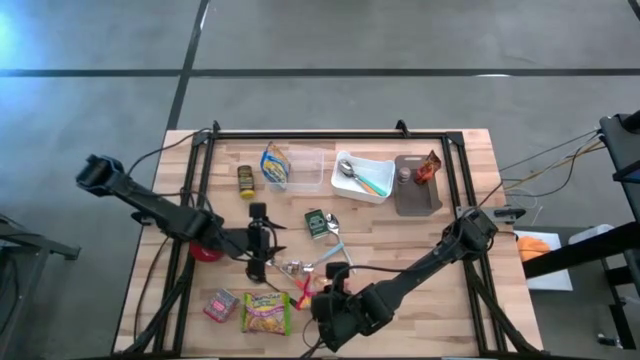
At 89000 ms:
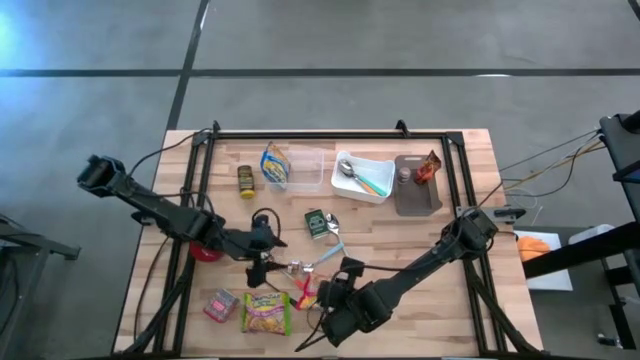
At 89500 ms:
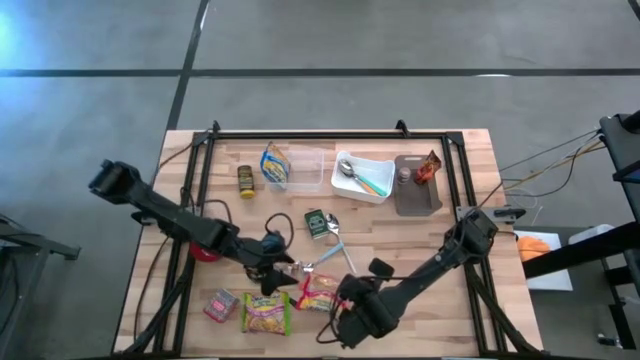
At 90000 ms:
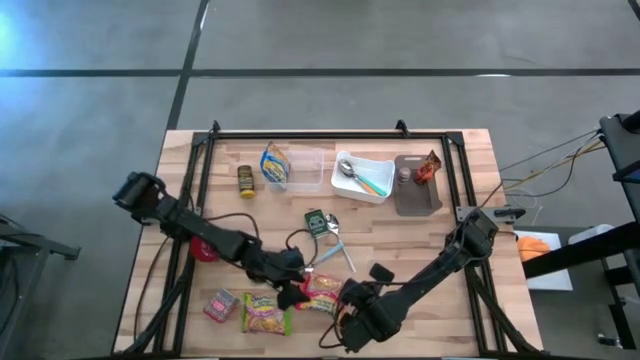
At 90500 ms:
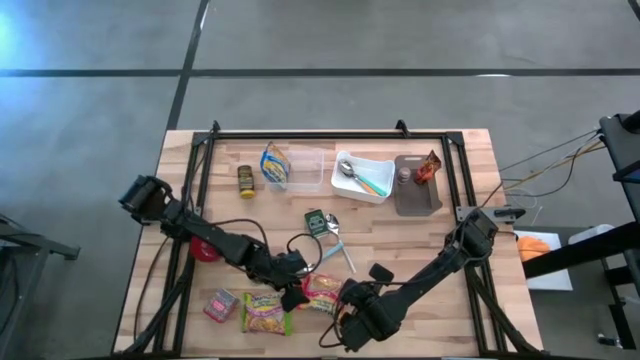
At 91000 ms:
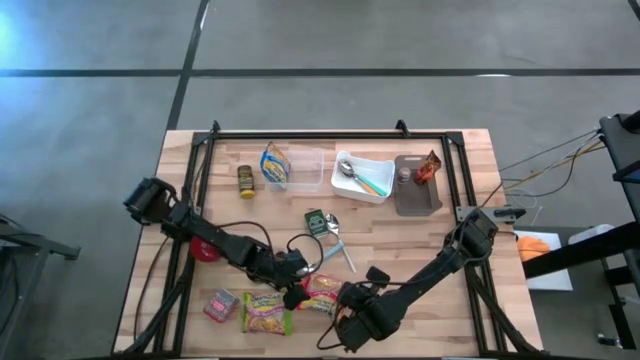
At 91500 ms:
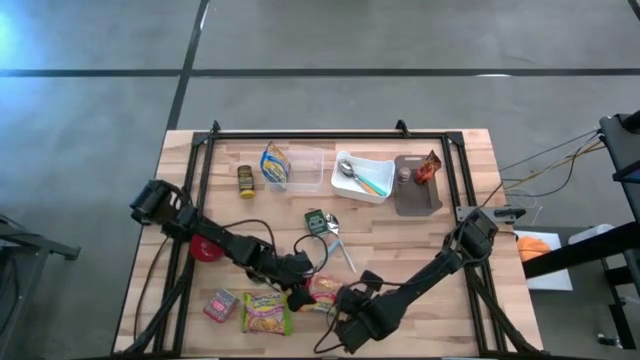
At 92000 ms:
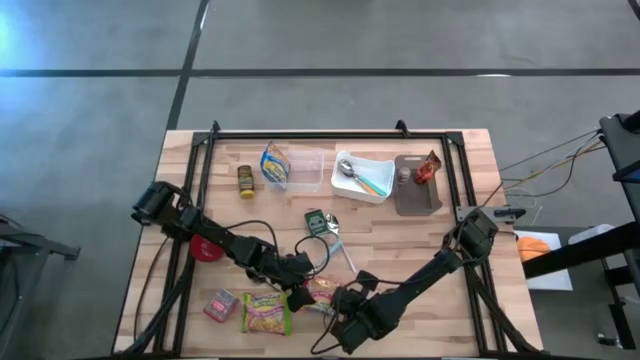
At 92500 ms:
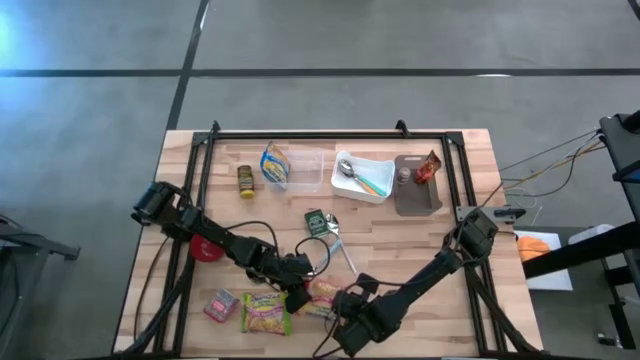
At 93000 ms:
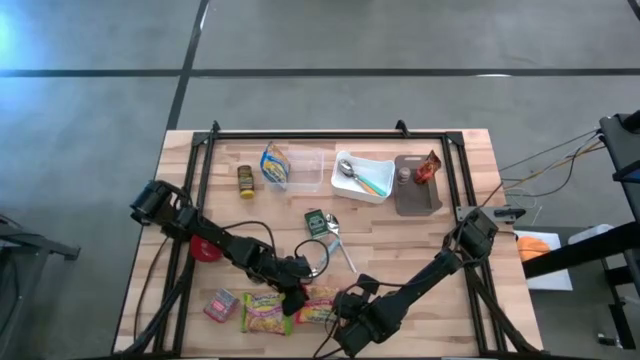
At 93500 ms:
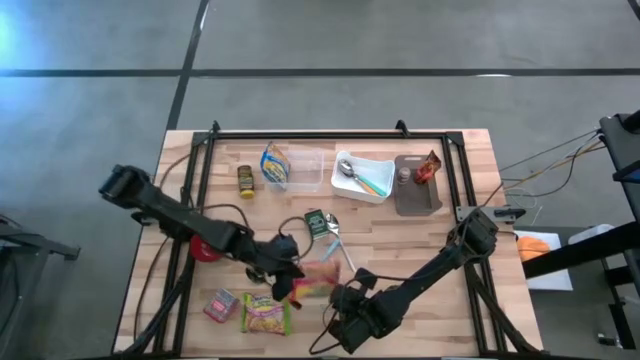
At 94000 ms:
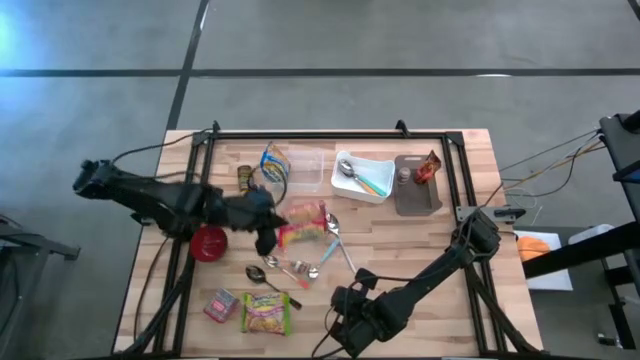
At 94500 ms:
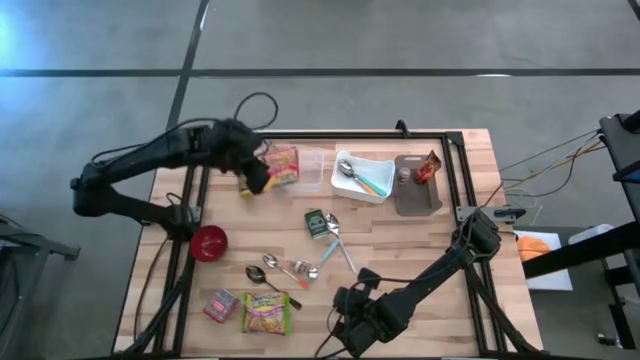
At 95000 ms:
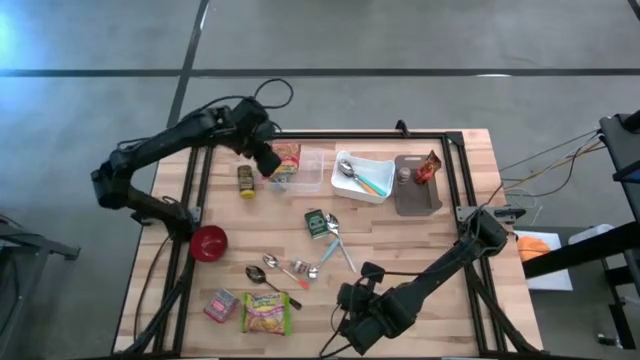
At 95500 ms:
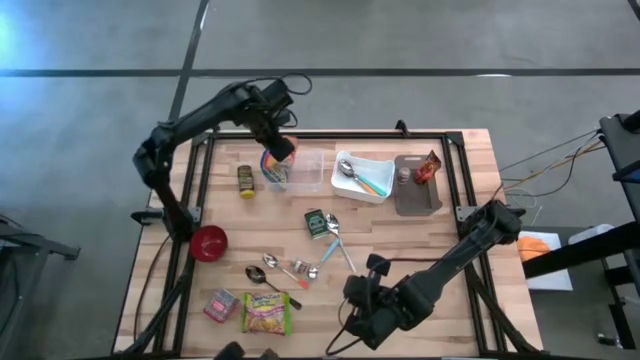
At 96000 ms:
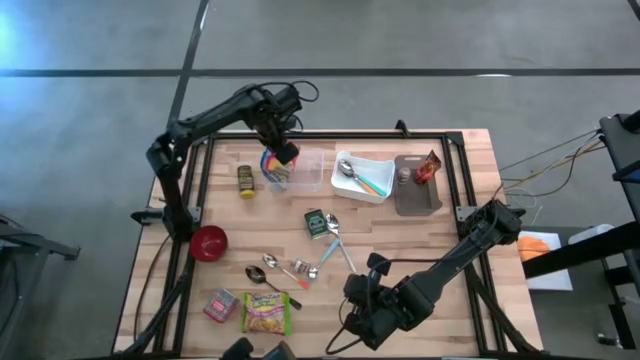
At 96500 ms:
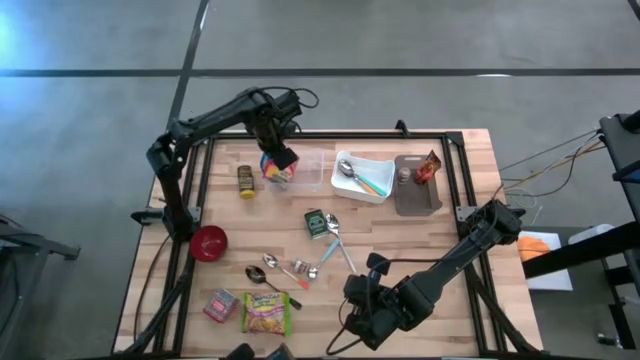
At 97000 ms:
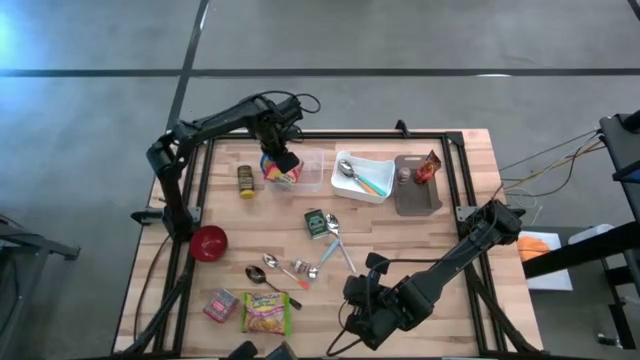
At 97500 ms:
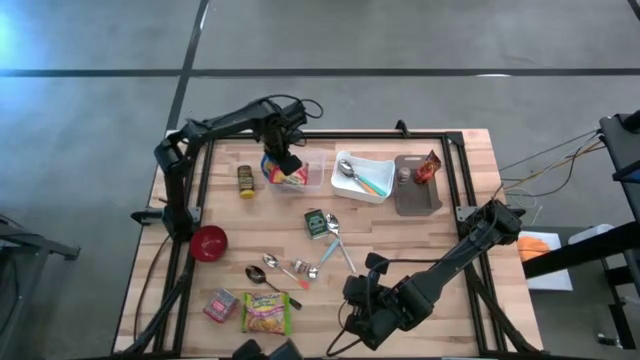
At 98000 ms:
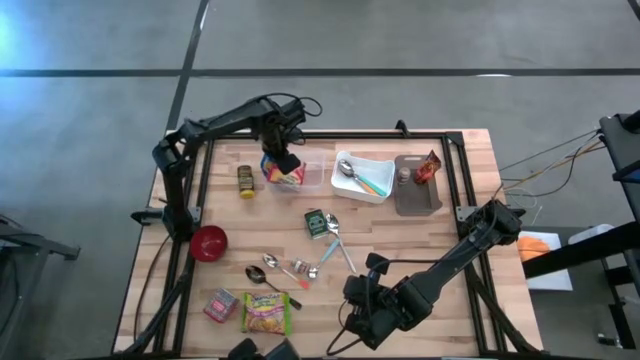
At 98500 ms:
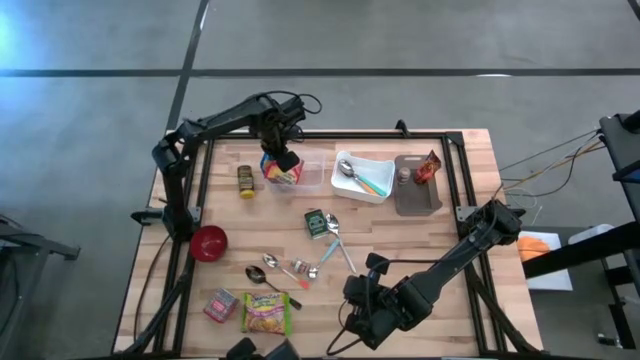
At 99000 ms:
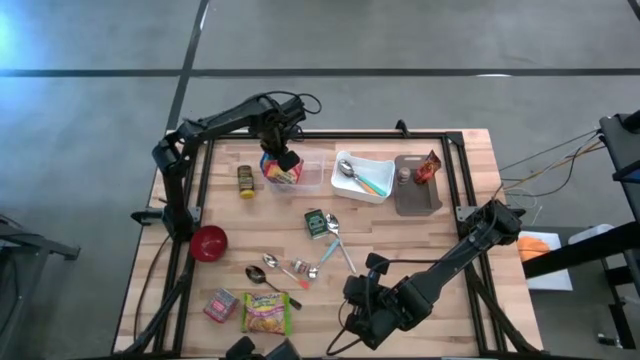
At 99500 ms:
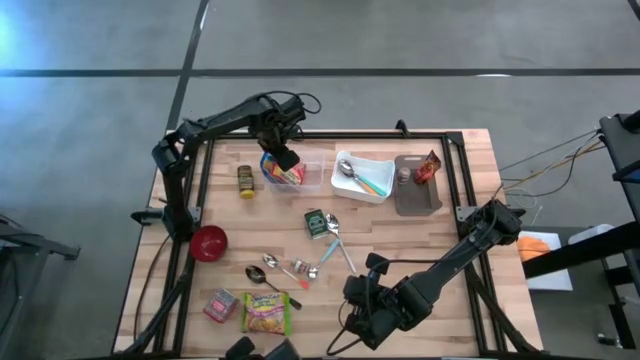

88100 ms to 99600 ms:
Put the red noodle pack into the transparent bin

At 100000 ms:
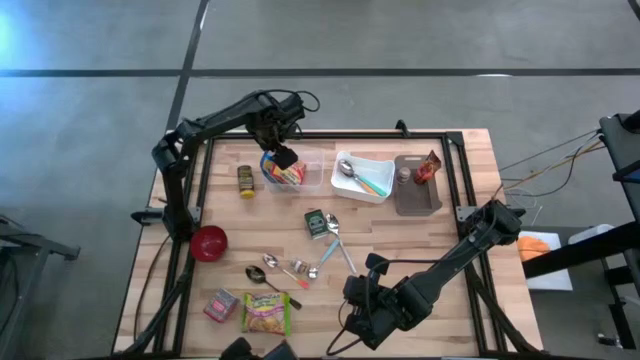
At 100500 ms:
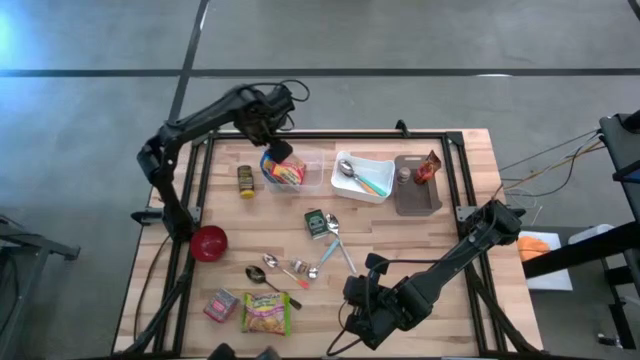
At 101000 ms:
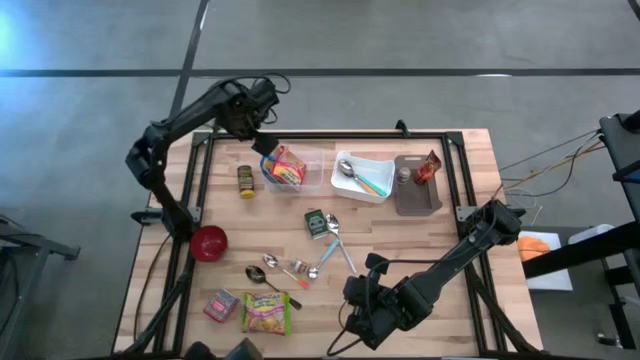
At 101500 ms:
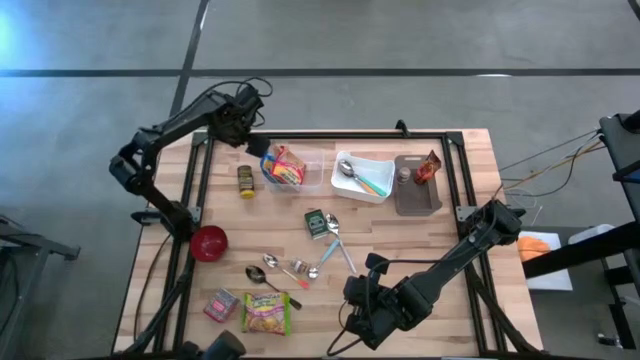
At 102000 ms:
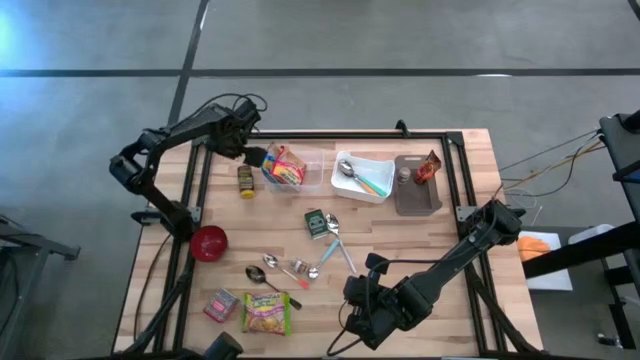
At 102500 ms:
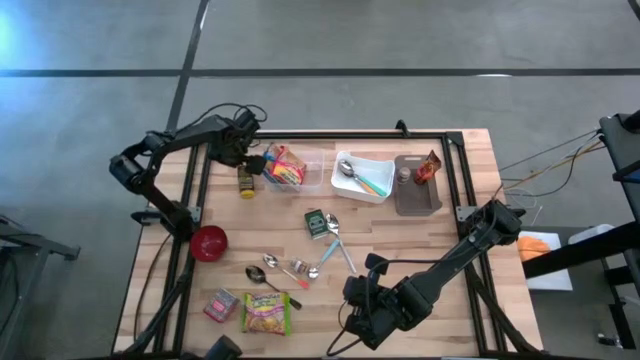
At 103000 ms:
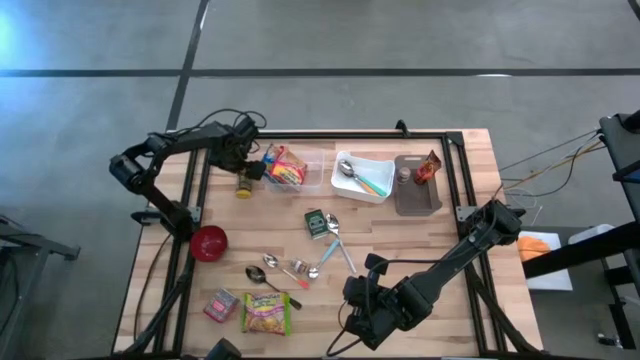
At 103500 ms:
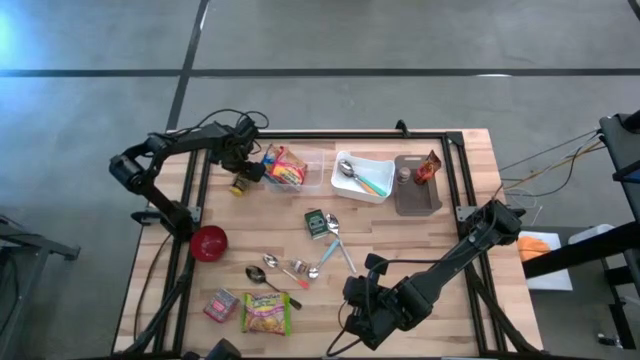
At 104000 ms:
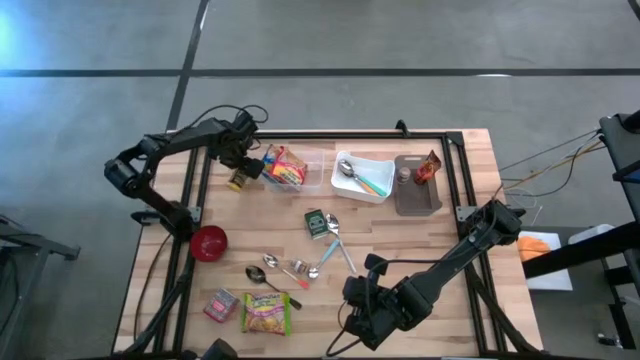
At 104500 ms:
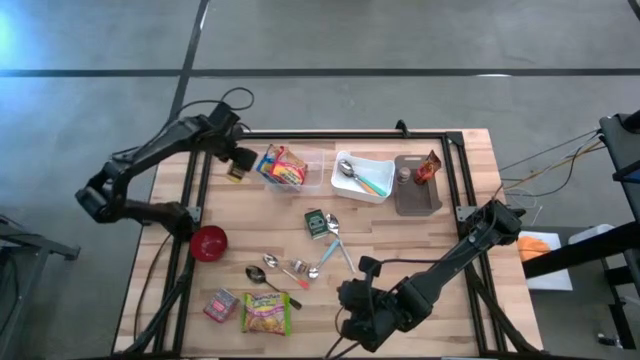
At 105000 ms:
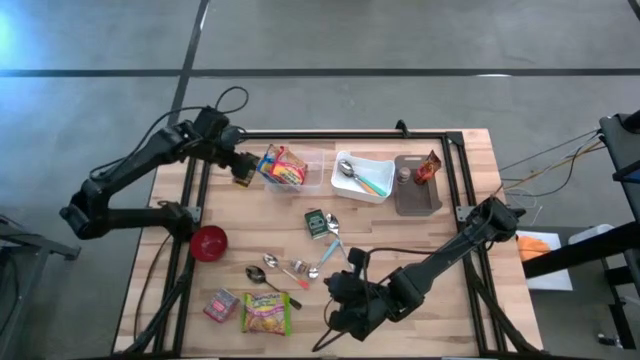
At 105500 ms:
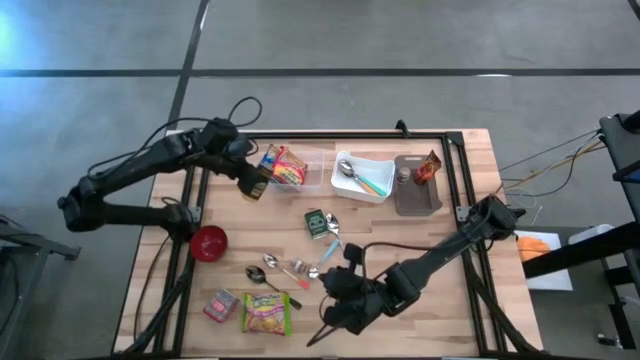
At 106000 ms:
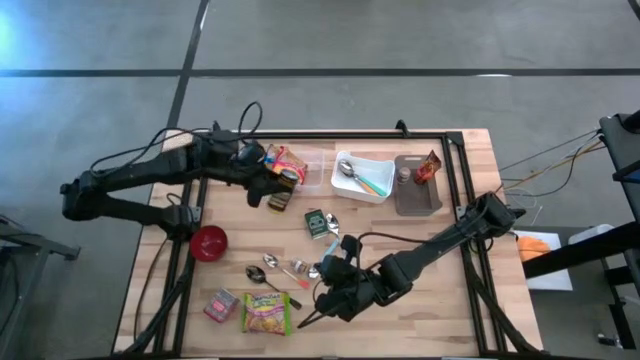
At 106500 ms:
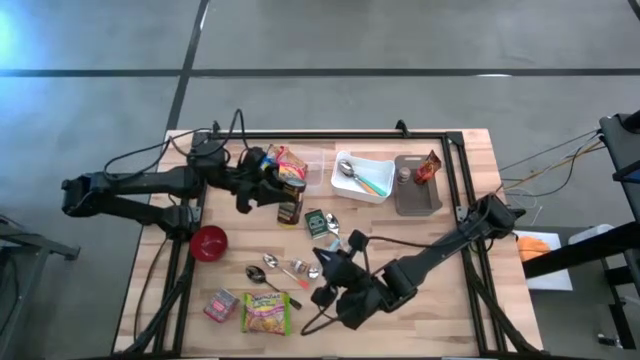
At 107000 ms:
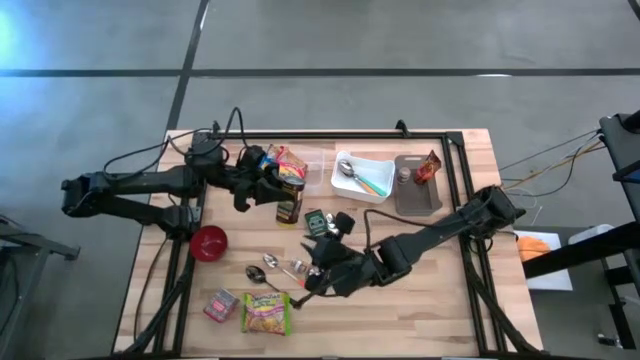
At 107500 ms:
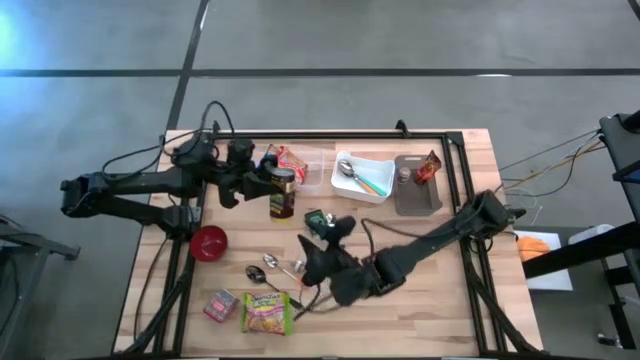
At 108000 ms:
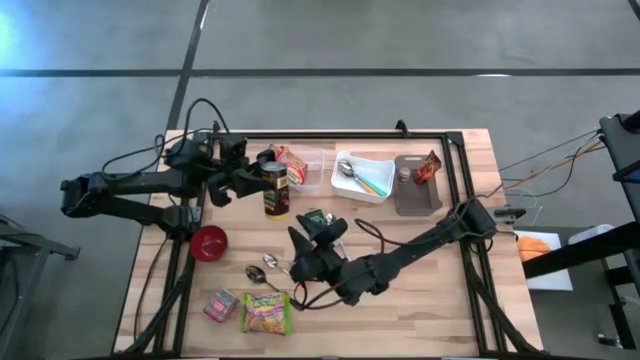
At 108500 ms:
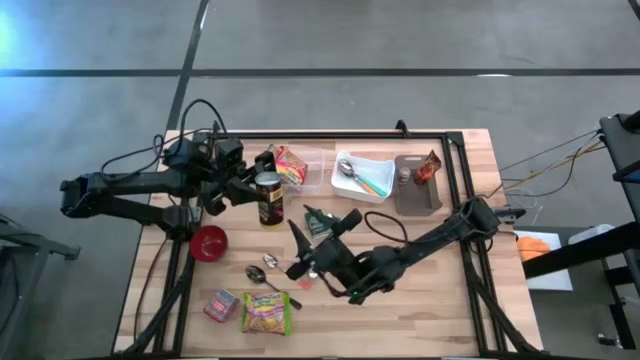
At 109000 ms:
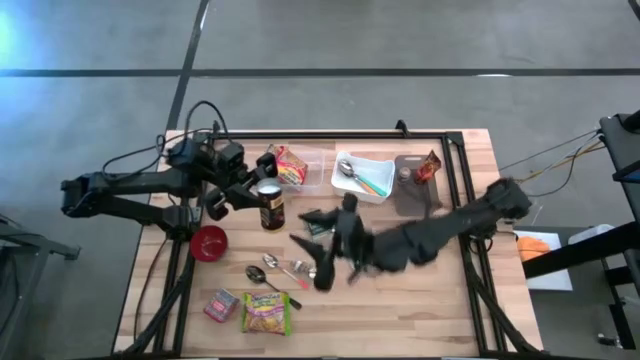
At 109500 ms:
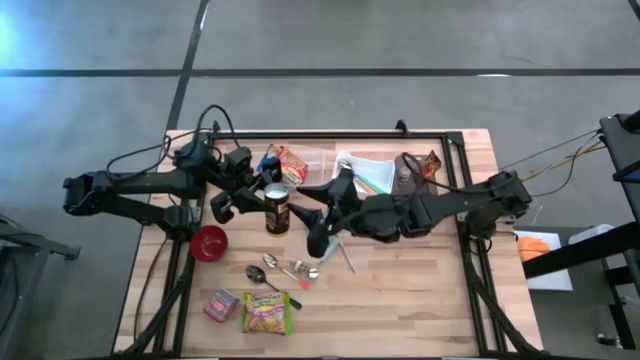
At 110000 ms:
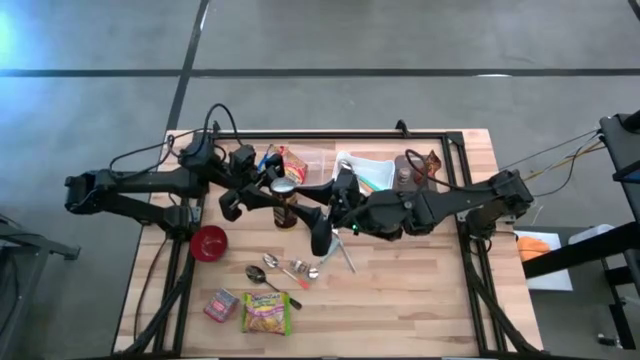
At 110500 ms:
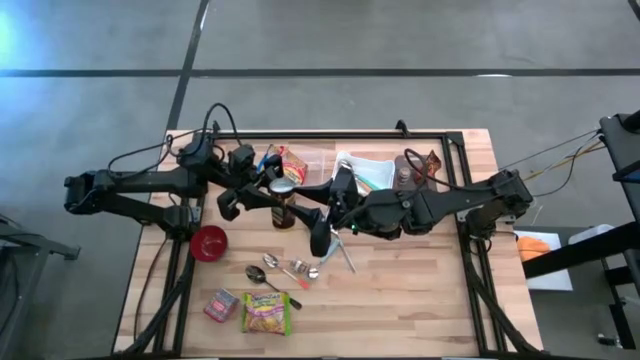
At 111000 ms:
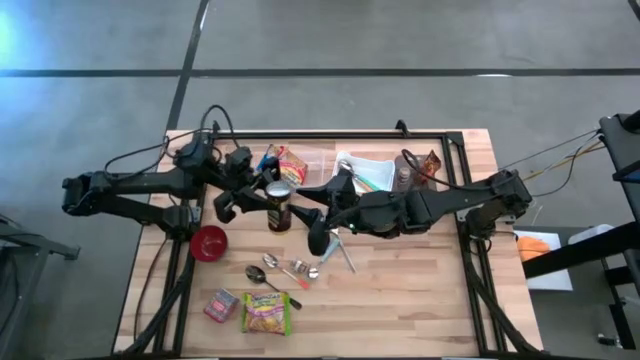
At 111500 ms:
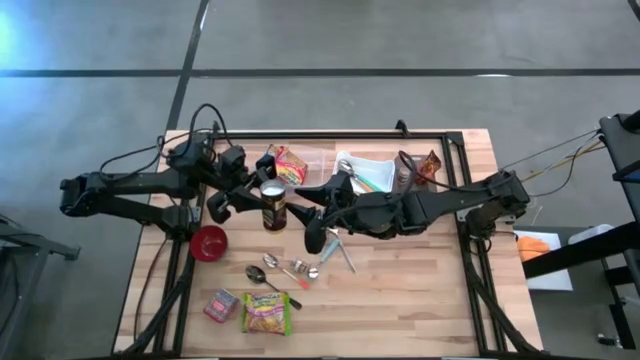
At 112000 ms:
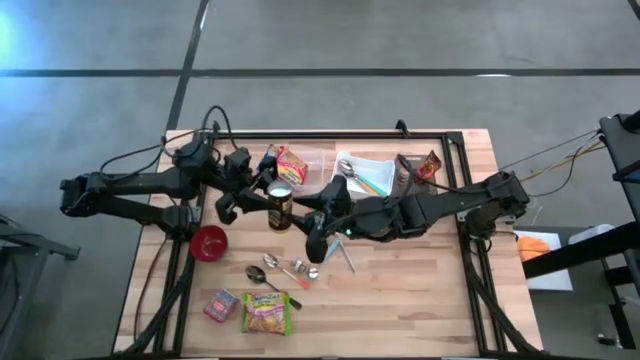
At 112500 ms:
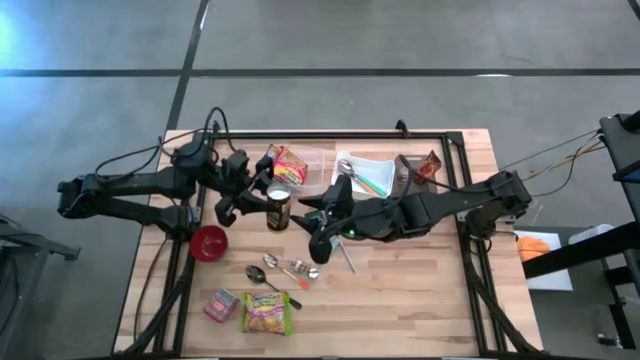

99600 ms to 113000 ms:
Put the yellow seasoning can into the black bin
